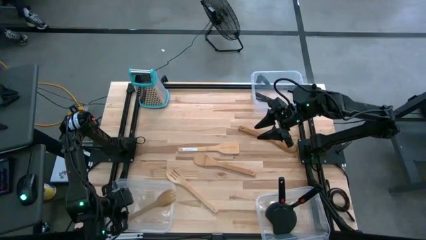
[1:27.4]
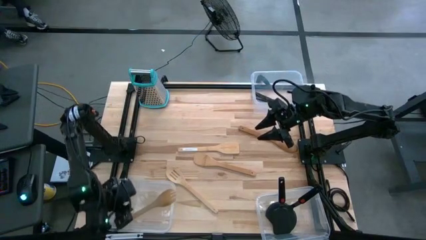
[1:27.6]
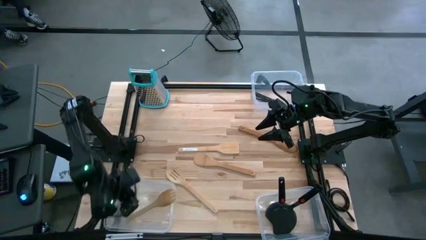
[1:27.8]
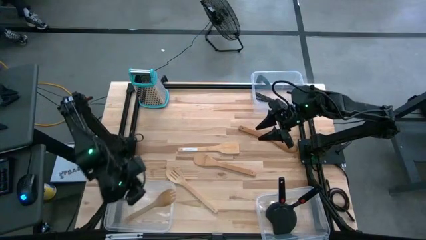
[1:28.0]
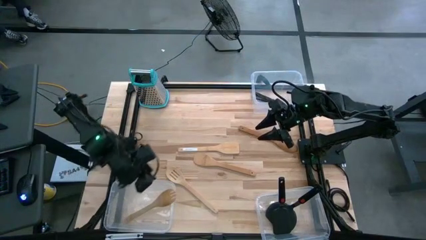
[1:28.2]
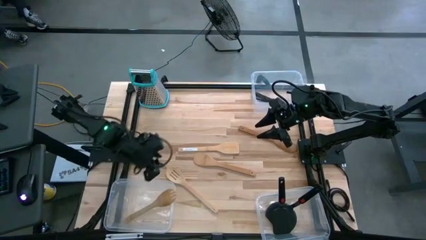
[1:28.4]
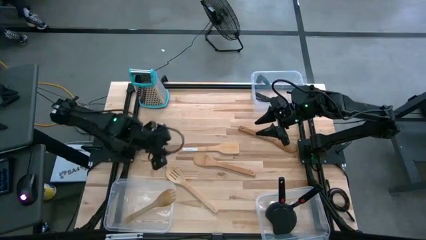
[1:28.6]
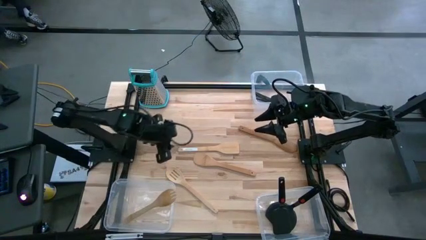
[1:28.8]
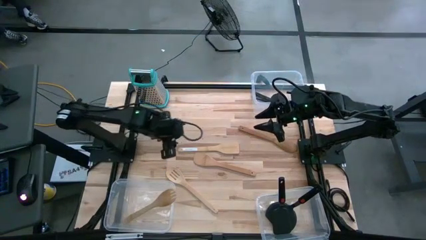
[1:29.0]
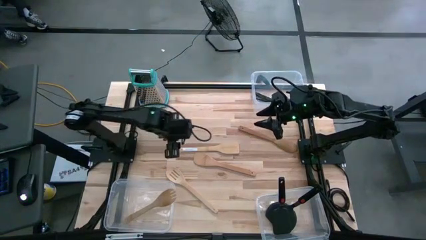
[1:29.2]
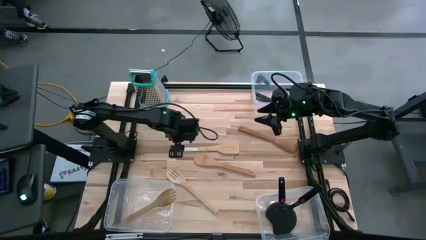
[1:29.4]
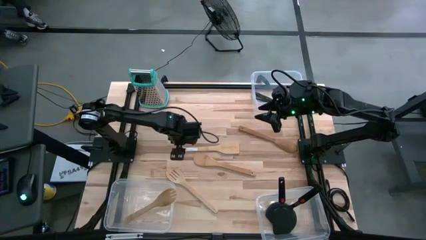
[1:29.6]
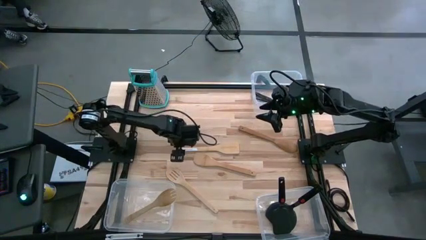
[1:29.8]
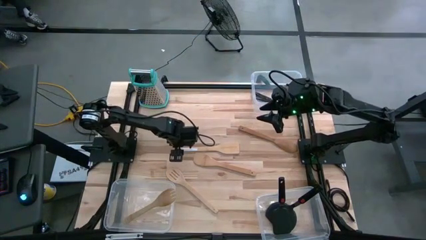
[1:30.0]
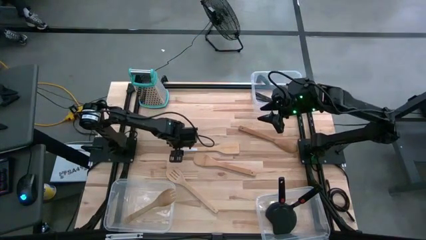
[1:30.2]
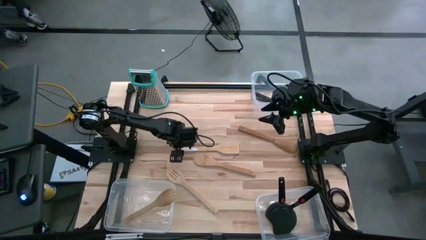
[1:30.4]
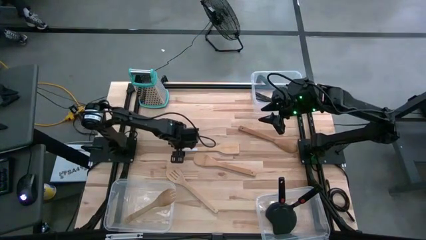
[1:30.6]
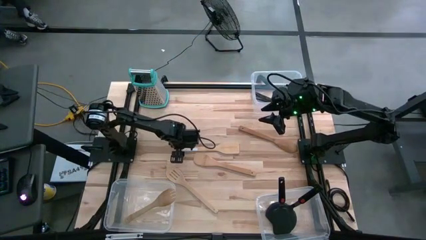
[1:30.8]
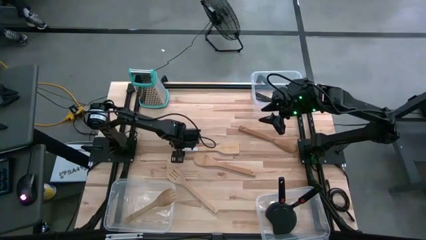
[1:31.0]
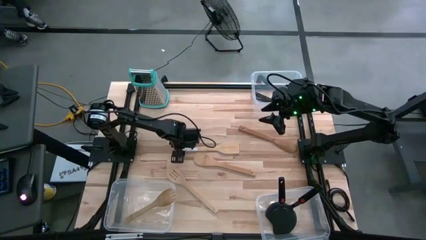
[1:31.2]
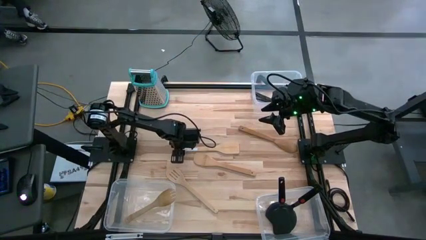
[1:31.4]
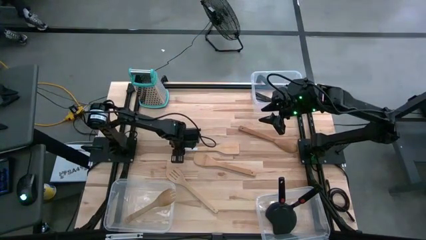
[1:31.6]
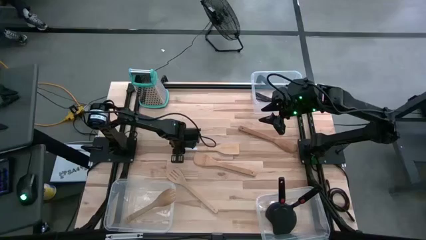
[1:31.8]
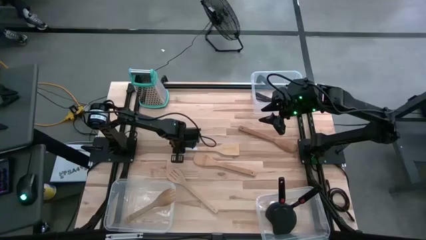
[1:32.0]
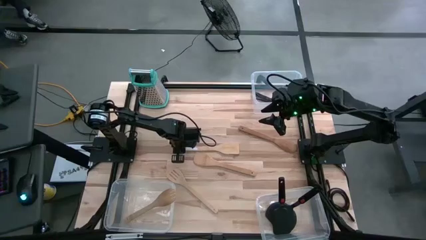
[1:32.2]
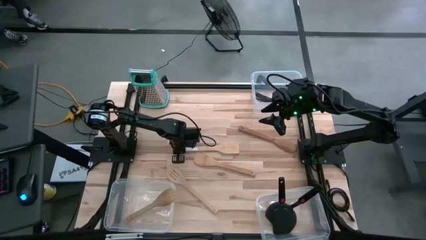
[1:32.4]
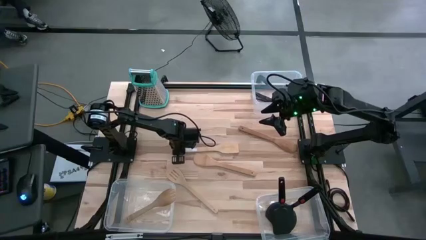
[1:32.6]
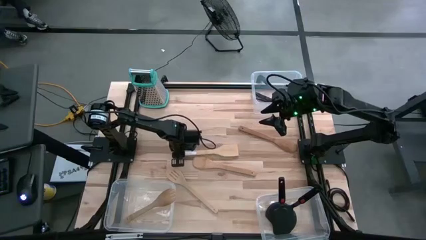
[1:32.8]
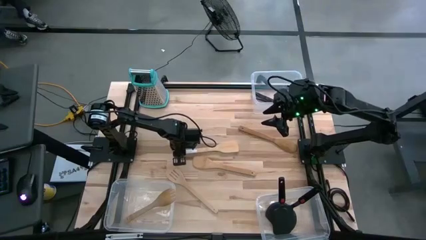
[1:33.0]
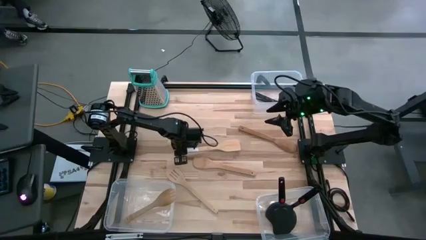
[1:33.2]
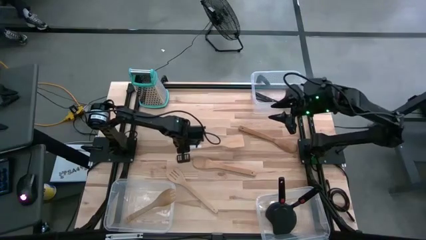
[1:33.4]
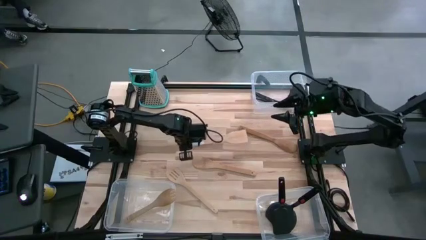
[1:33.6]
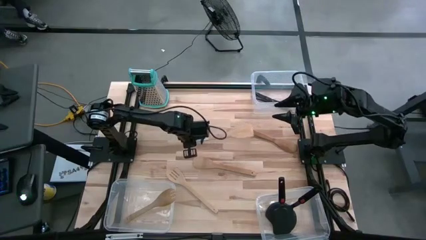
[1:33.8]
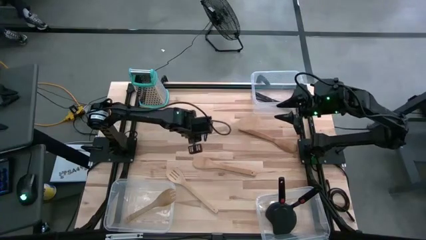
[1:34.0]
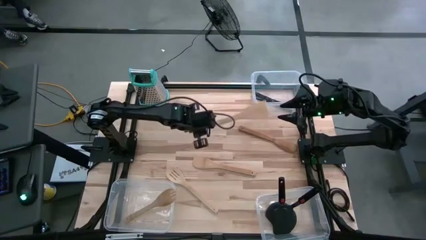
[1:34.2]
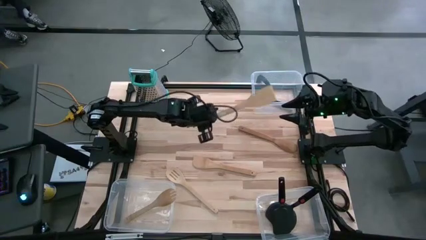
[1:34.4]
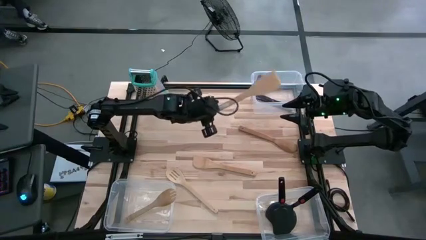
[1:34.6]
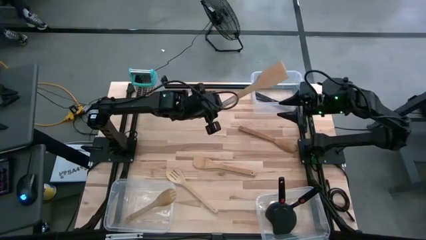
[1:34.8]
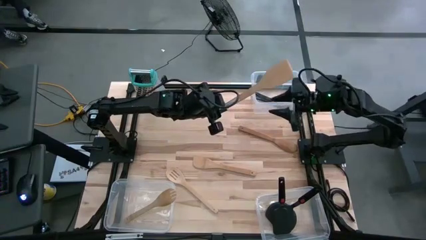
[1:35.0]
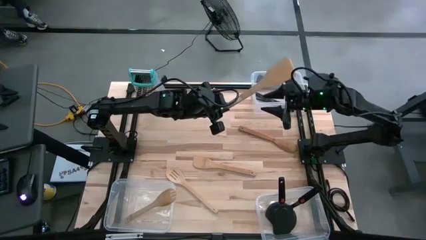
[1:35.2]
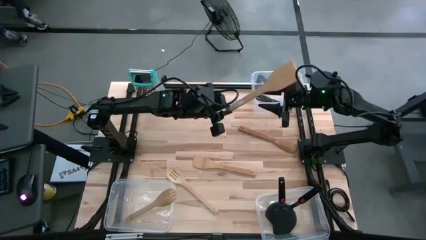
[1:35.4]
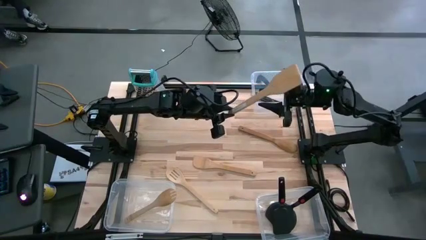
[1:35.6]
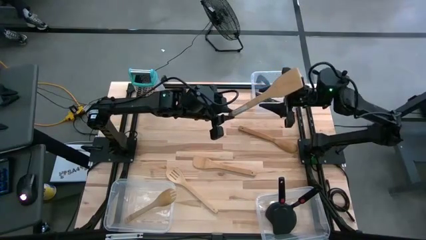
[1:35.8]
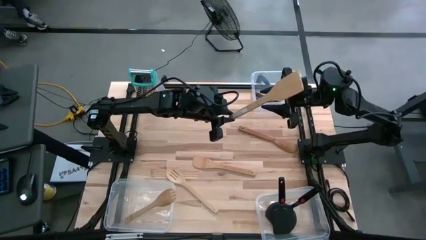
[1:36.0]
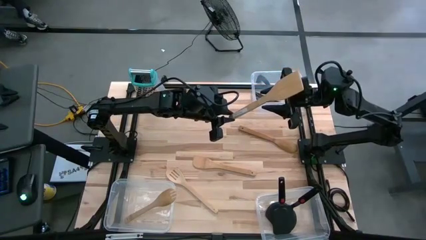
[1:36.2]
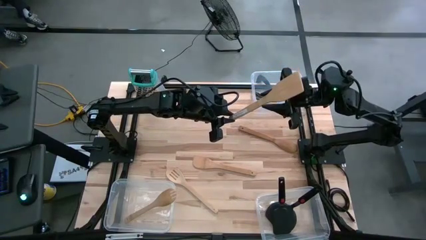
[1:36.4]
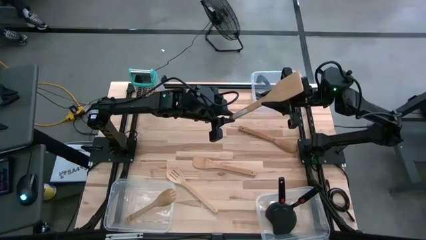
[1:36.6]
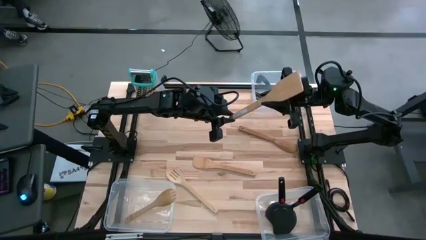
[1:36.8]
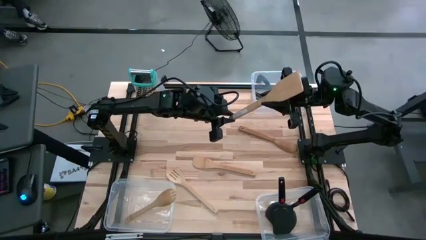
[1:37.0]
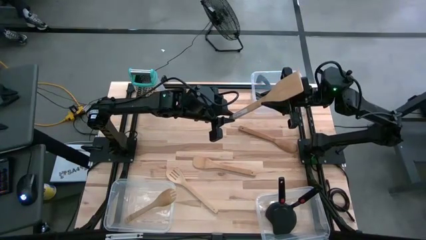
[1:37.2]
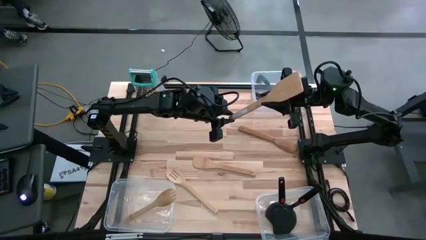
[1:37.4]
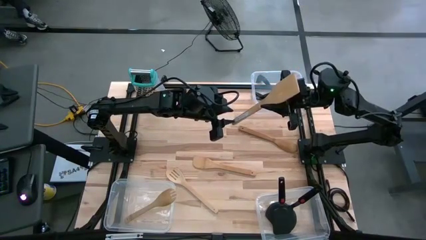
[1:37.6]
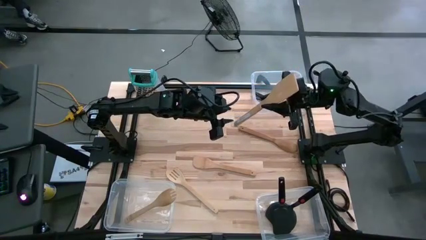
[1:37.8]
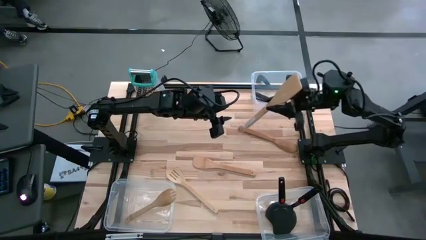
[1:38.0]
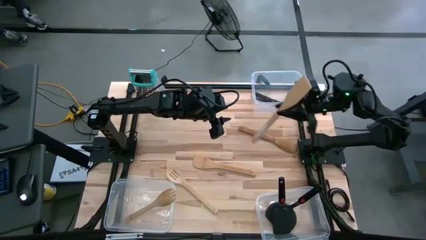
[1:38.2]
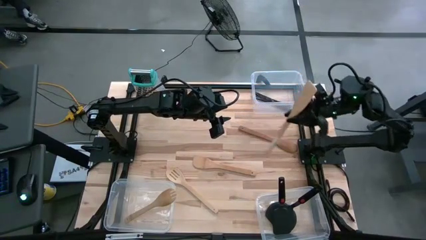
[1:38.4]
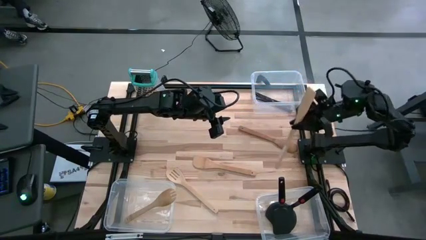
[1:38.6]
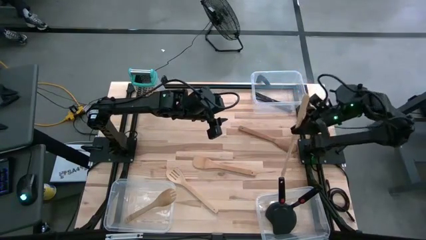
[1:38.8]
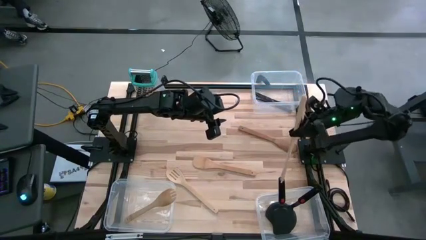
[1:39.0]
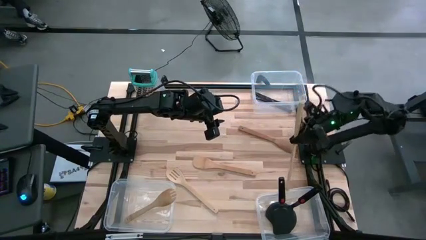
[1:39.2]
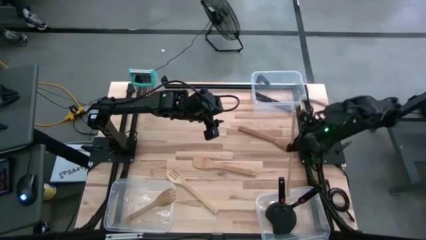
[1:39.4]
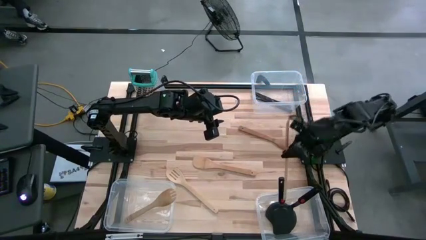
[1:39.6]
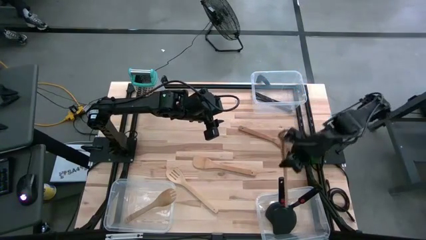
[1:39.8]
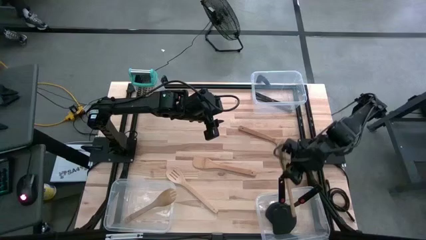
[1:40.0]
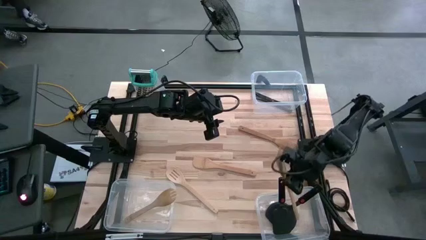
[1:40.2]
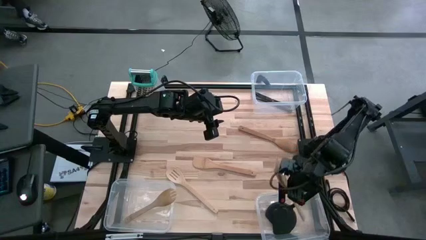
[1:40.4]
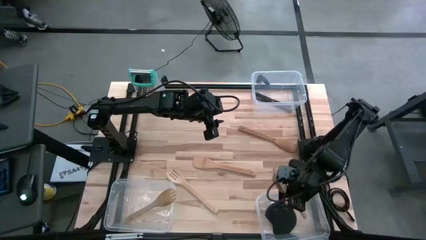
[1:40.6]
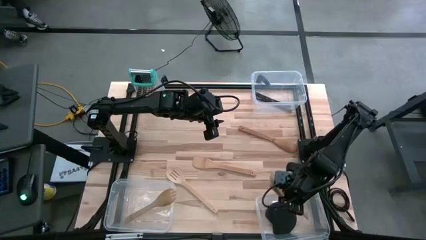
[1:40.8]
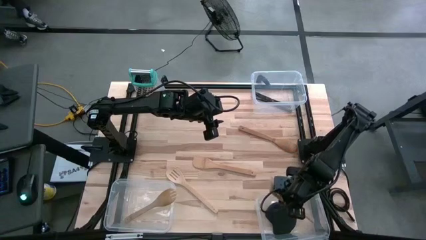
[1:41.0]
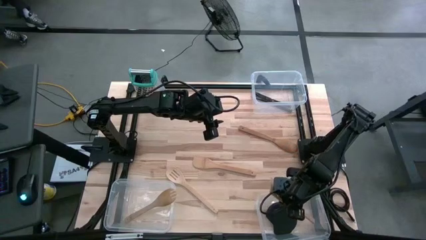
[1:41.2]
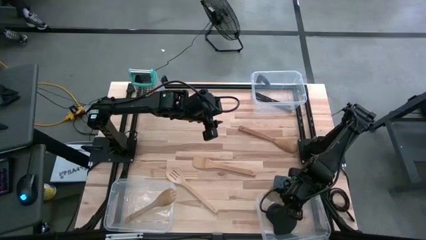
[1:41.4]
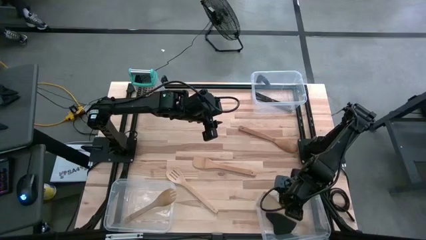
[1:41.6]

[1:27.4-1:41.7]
Task: Pick & Place Kitchen Items
Put the light brown spatula into the bottom right transparent bin
